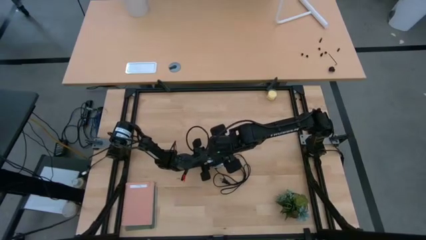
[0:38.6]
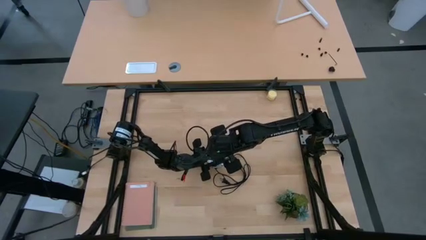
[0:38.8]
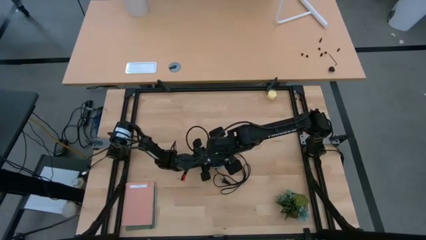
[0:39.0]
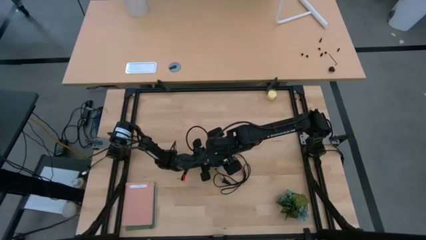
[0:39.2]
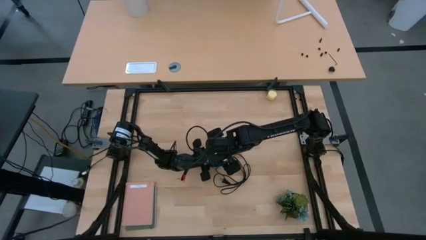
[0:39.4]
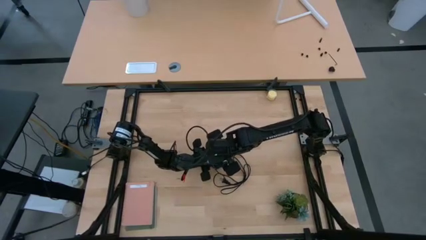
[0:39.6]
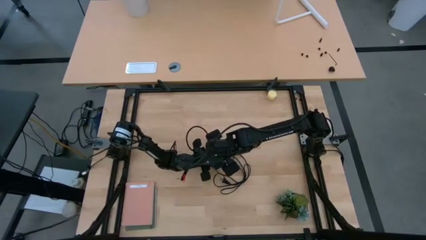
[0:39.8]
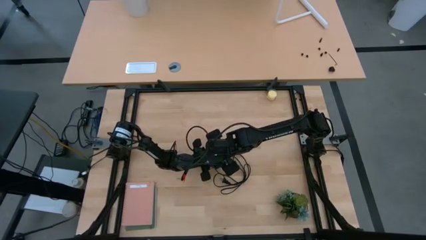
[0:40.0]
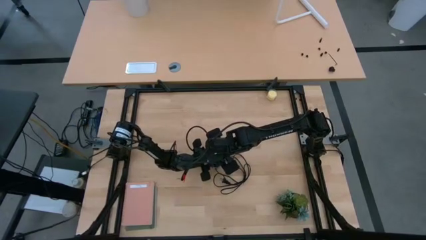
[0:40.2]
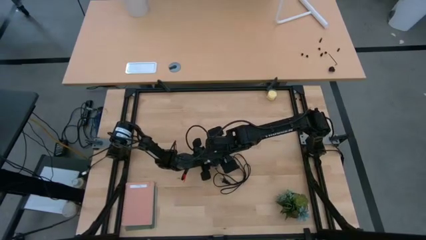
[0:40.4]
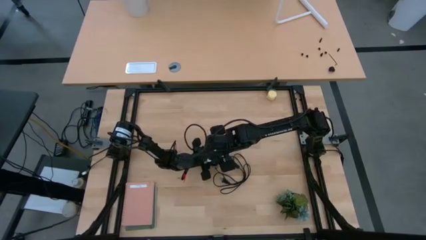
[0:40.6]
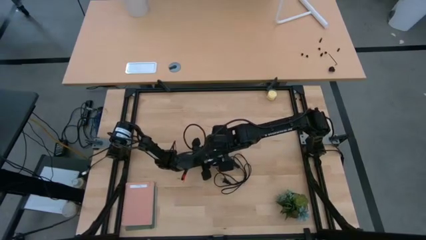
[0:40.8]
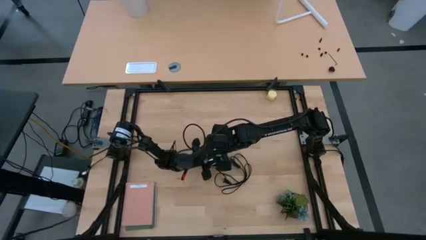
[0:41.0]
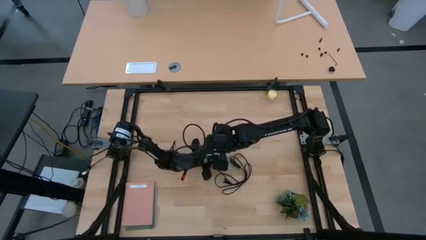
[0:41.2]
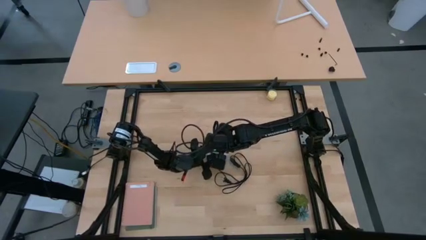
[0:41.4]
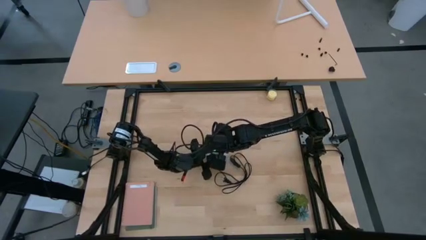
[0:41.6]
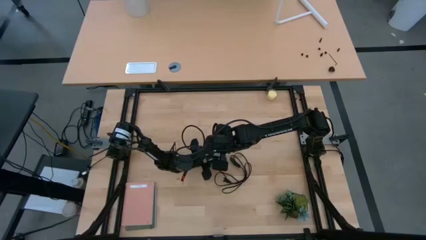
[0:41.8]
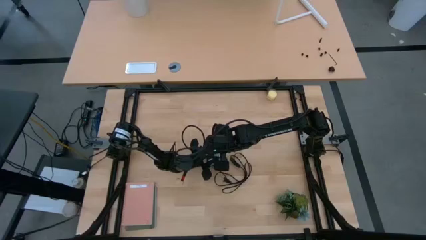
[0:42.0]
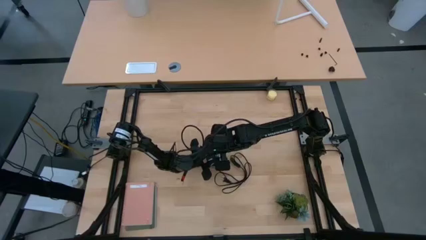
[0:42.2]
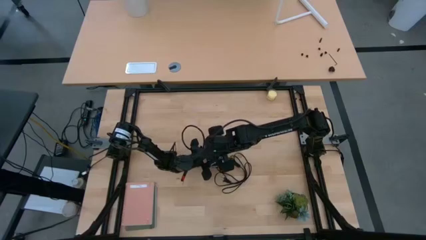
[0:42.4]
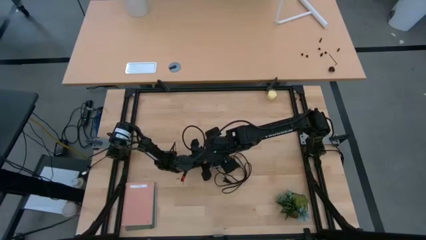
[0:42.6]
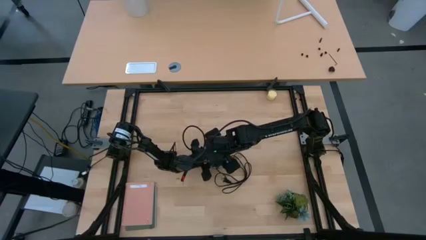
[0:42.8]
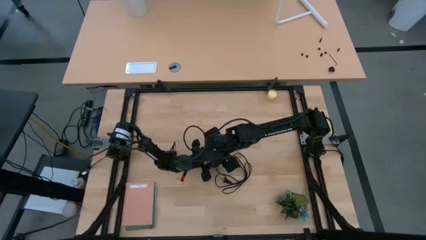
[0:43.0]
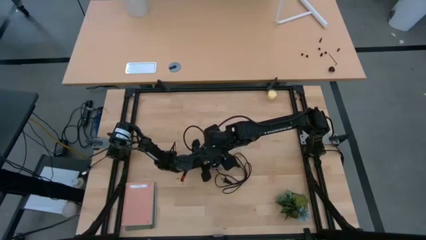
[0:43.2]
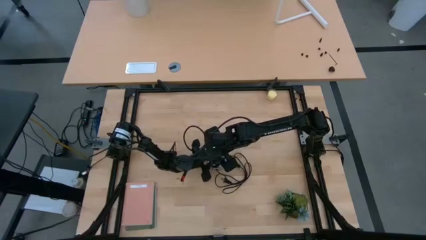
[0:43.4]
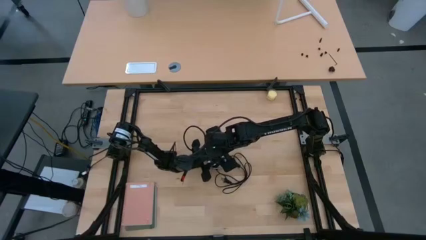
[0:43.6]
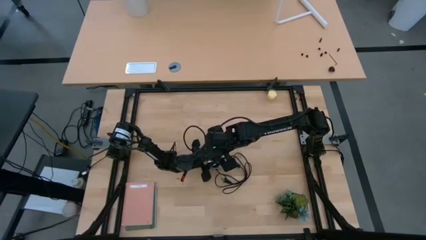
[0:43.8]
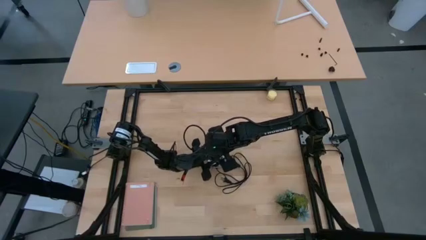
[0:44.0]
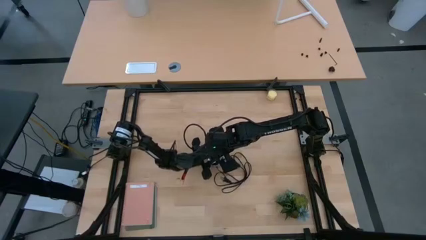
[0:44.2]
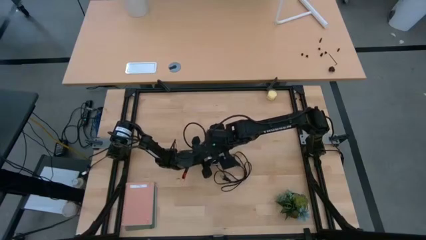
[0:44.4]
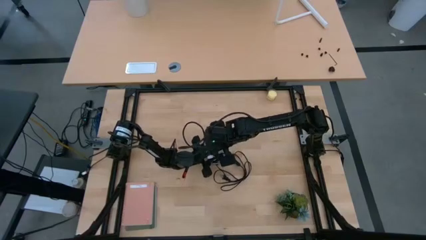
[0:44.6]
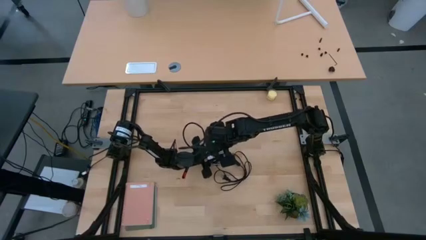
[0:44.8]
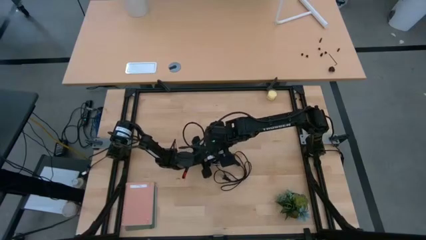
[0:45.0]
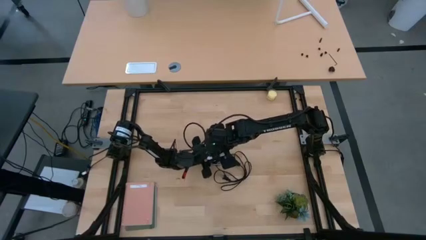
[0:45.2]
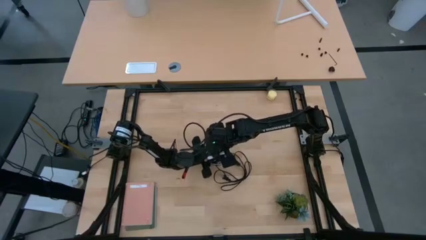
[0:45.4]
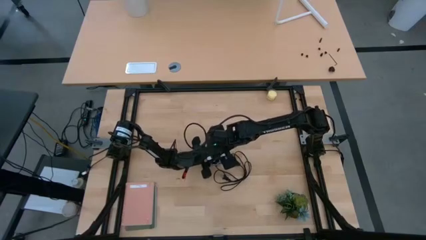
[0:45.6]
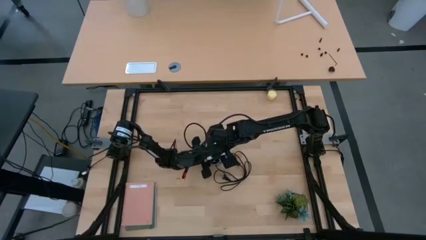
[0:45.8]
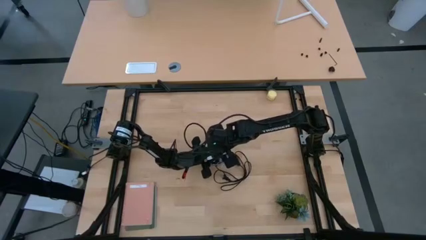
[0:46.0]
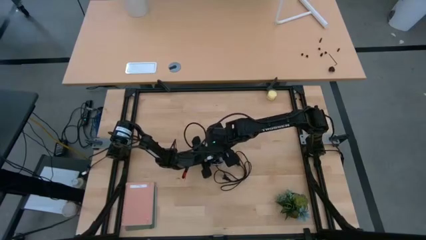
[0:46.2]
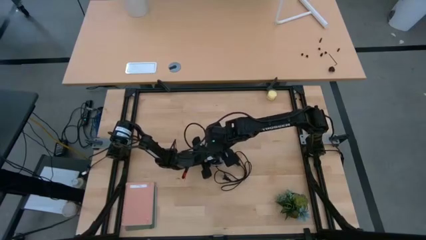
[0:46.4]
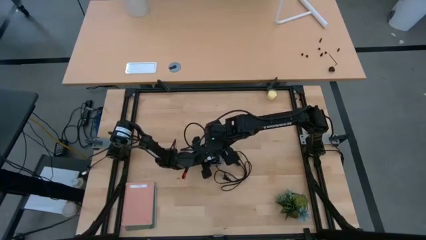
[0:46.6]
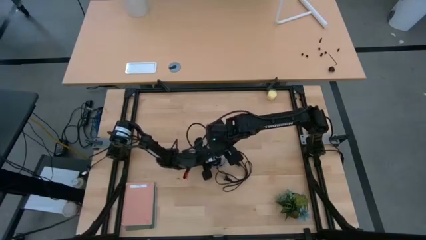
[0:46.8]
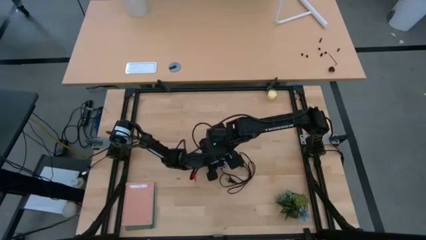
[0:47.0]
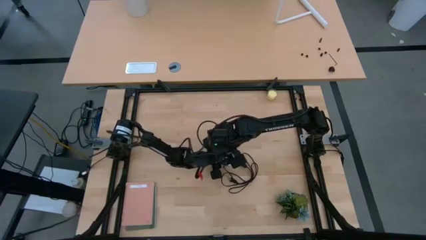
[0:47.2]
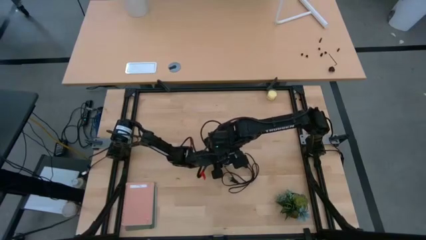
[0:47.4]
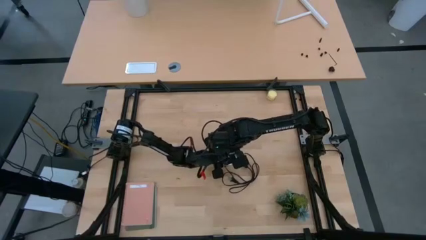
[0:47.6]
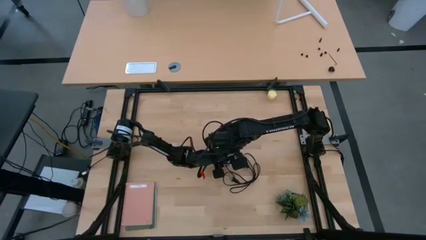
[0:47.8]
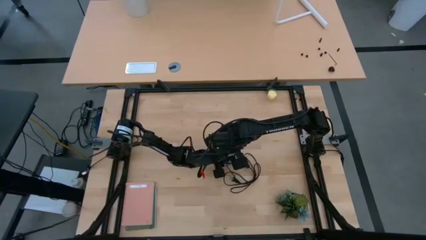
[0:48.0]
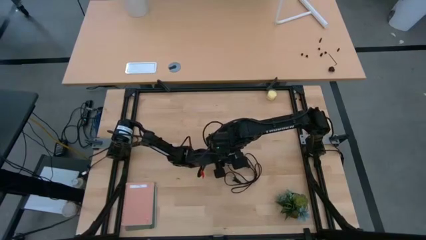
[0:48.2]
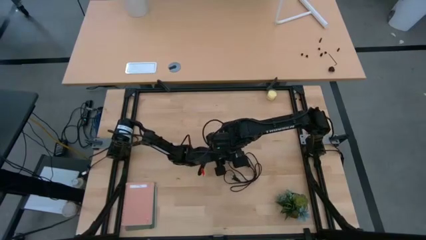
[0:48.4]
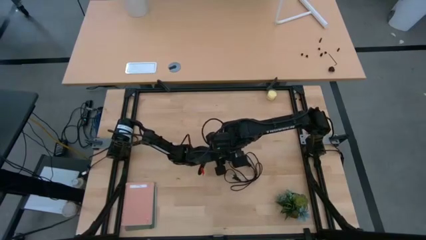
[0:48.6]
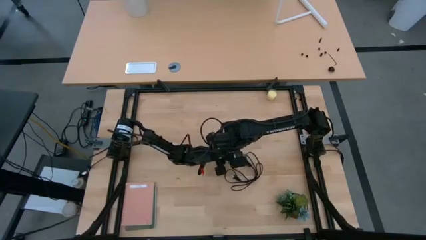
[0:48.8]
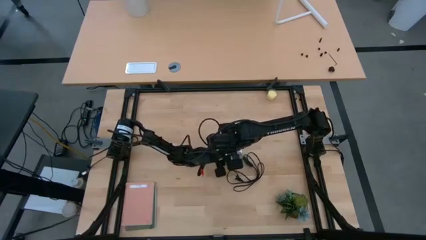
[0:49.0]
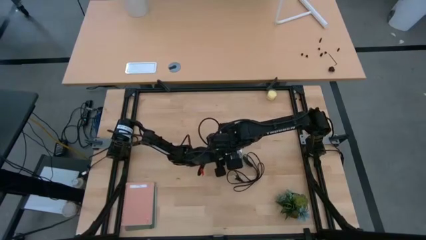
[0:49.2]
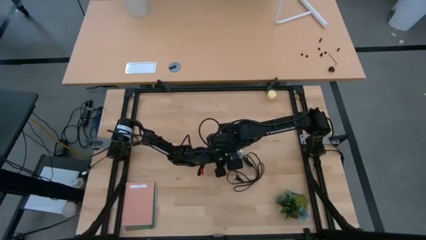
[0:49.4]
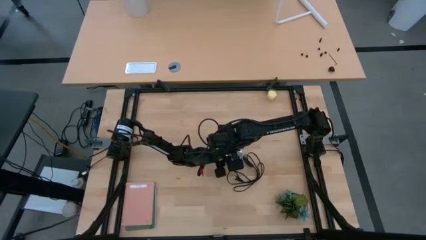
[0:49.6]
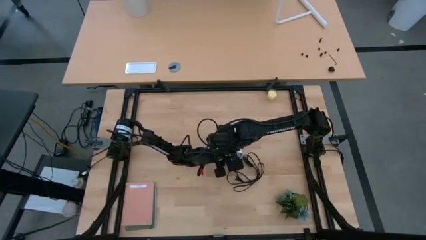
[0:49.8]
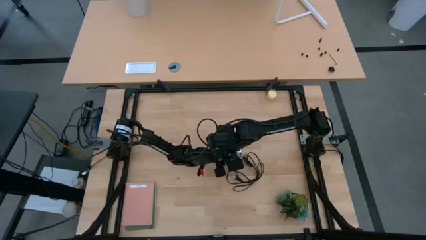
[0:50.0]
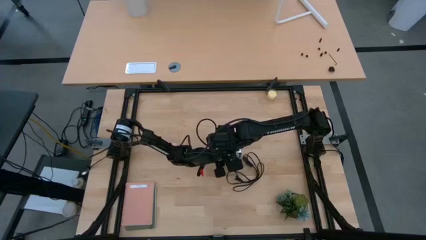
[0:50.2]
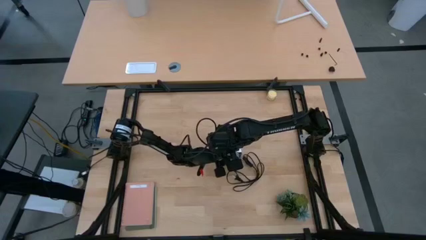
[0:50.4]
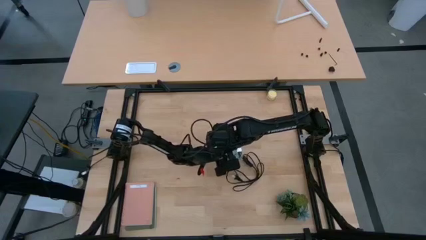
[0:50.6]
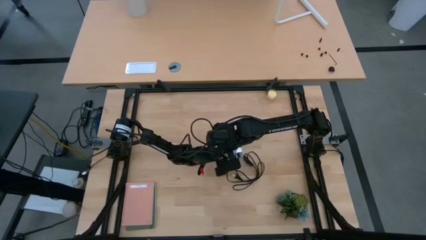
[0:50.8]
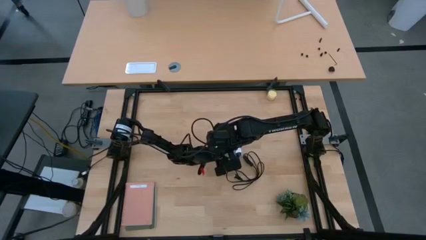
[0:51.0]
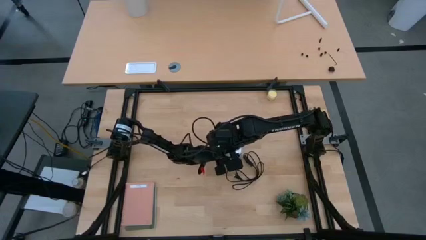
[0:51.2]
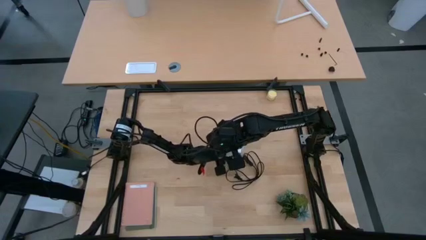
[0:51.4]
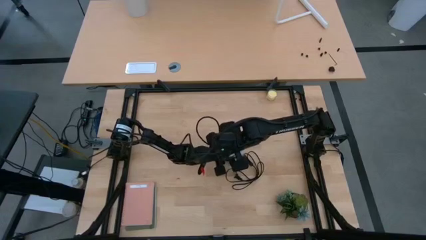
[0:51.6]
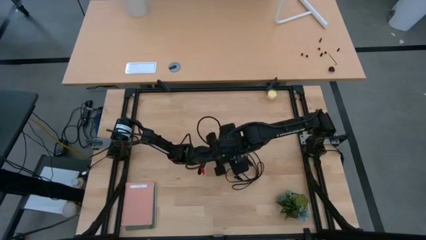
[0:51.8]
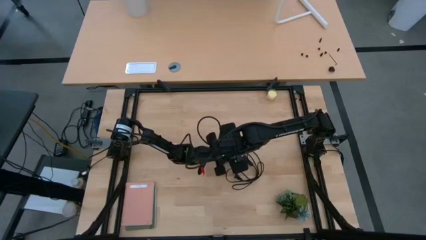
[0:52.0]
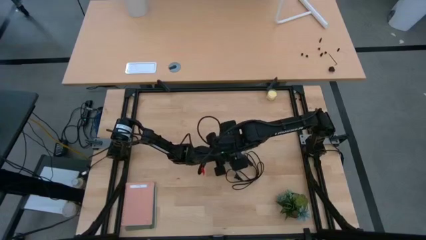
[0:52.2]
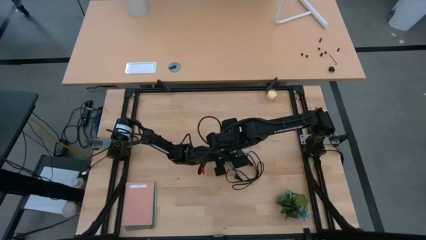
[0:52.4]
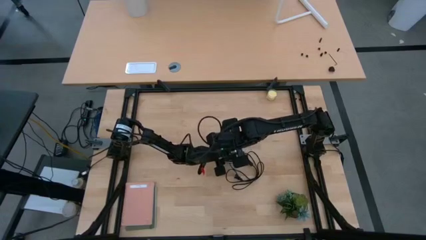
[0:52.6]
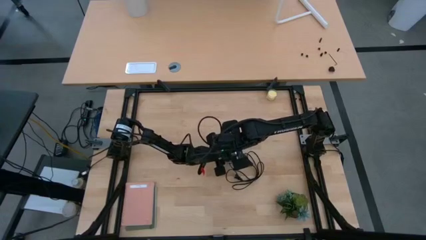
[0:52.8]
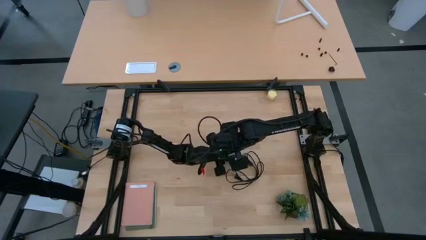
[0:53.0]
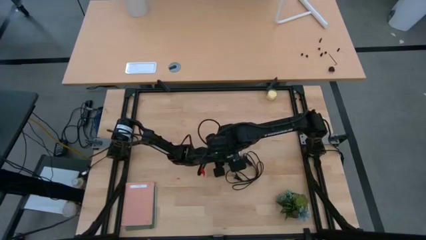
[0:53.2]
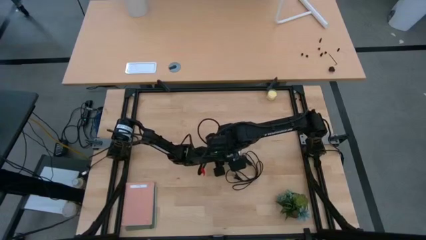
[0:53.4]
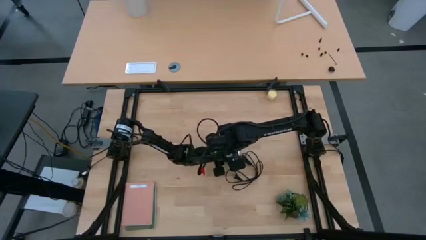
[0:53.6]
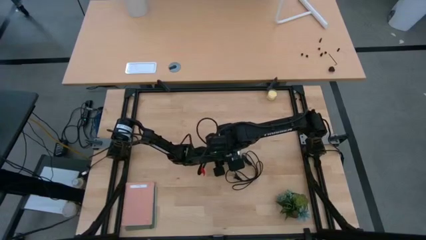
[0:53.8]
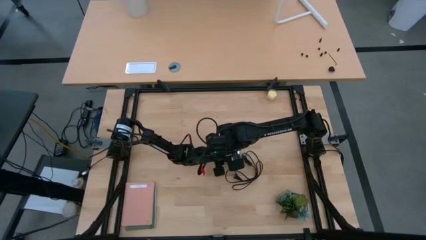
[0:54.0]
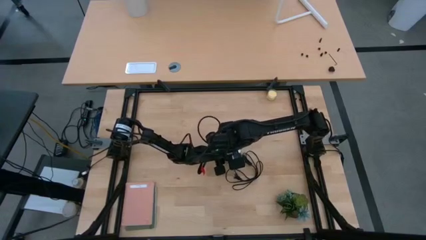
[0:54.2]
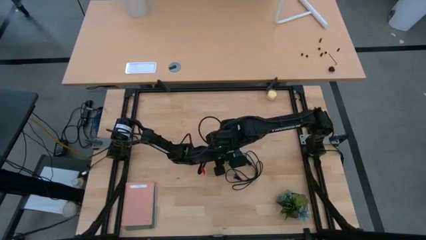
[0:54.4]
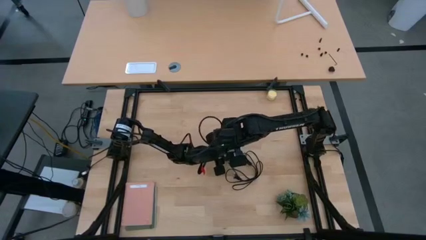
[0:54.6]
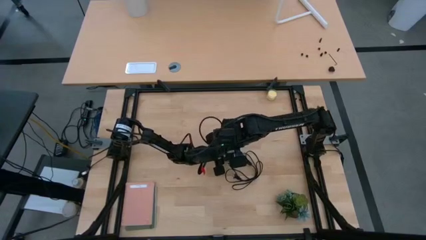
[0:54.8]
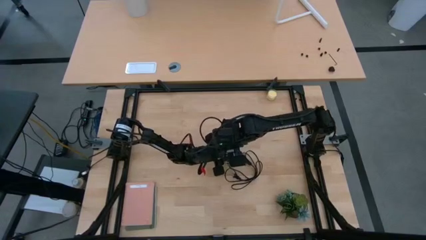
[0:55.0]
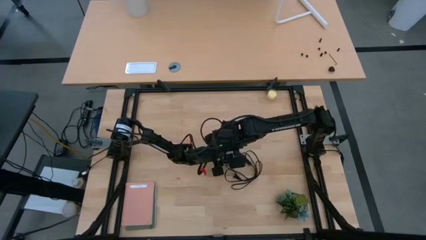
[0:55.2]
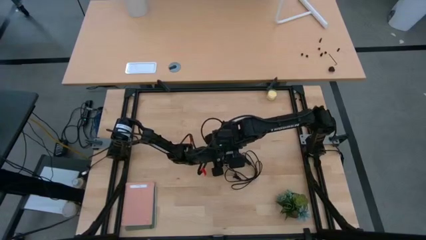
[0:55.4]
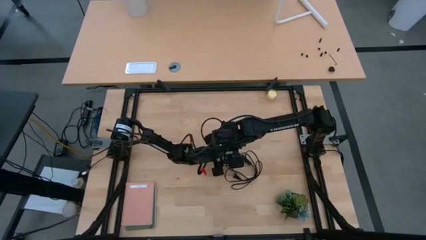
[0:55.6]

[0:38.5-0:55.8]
Task: Screw lightbulb
Insert the white lightbulb into the silver lamp
